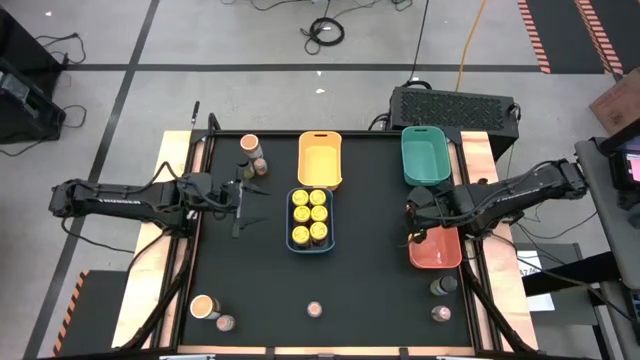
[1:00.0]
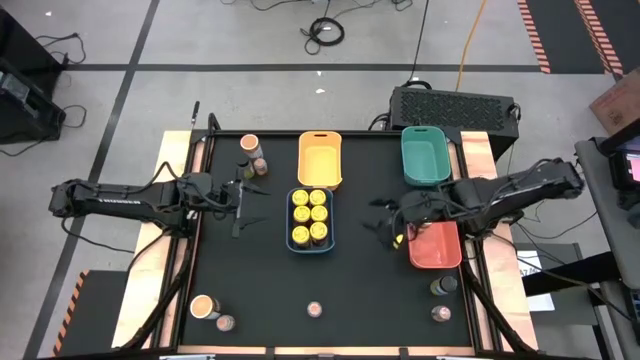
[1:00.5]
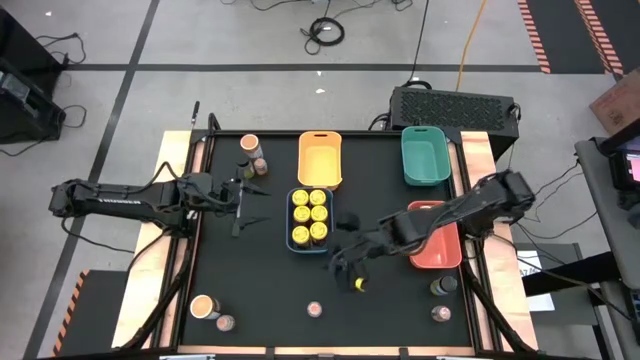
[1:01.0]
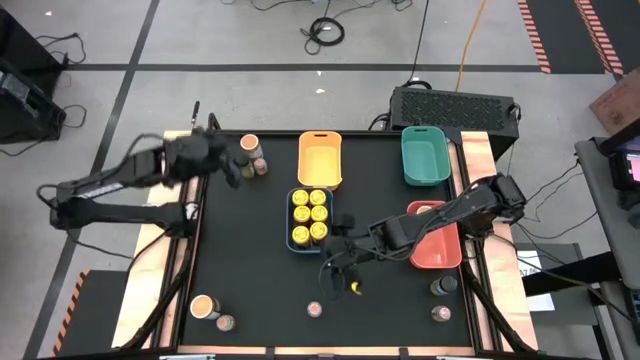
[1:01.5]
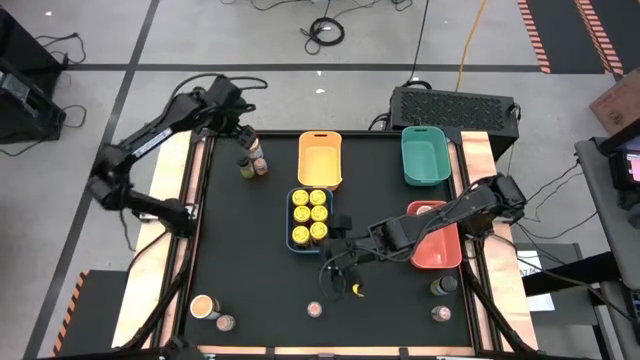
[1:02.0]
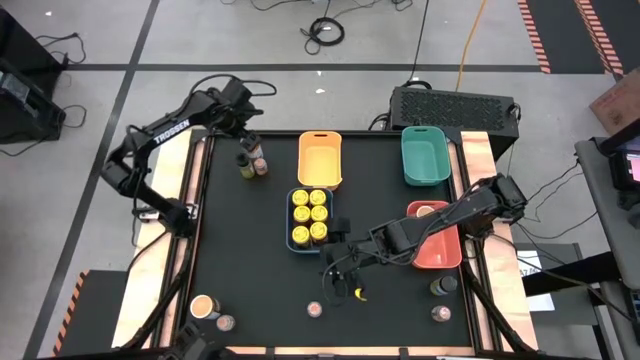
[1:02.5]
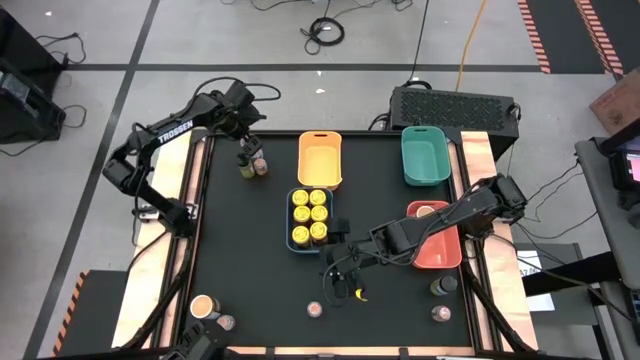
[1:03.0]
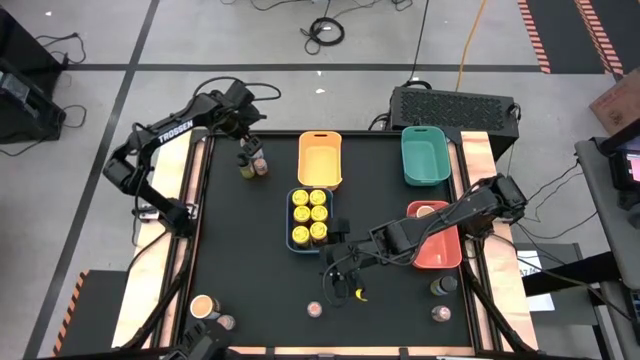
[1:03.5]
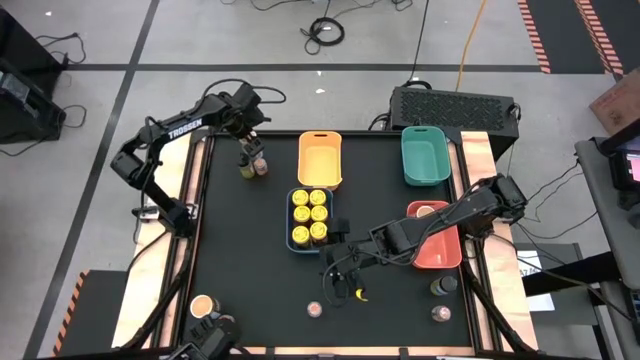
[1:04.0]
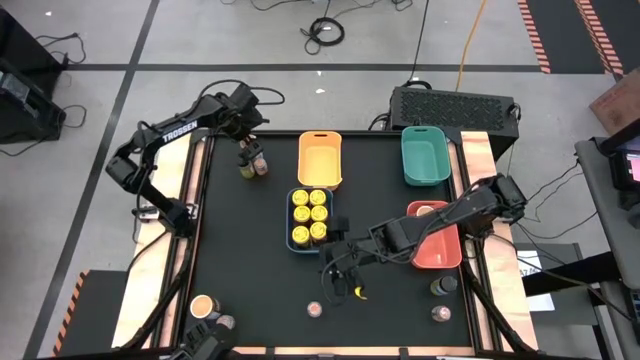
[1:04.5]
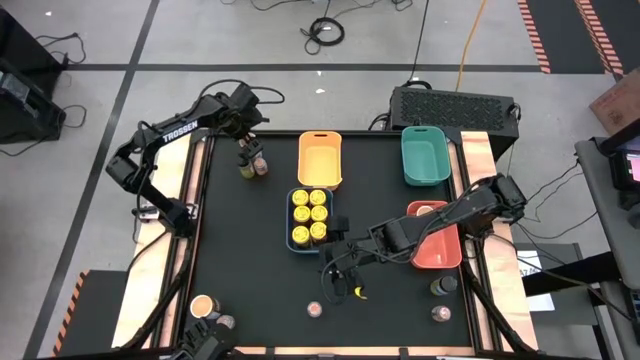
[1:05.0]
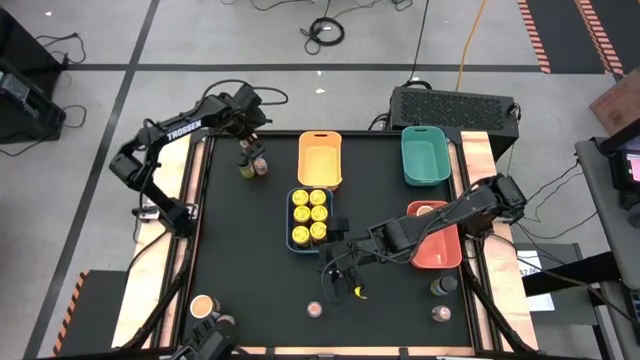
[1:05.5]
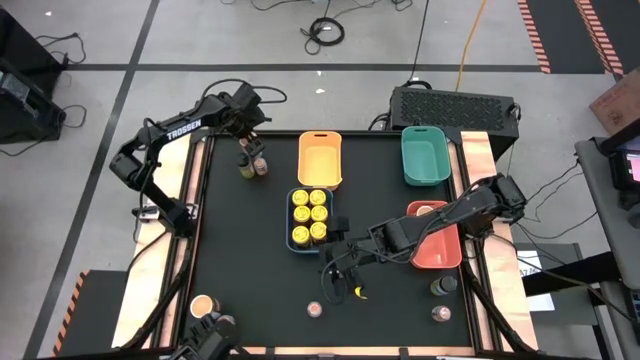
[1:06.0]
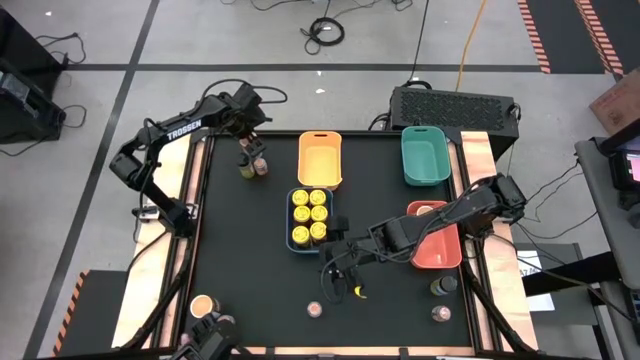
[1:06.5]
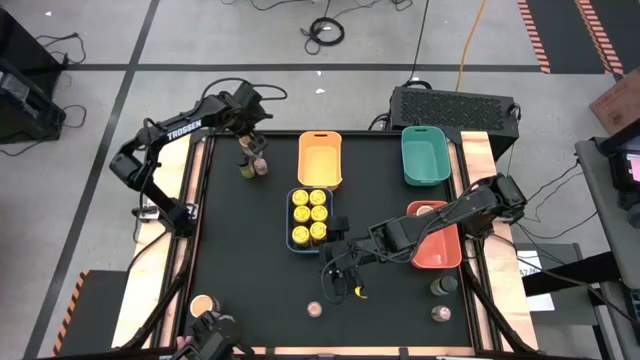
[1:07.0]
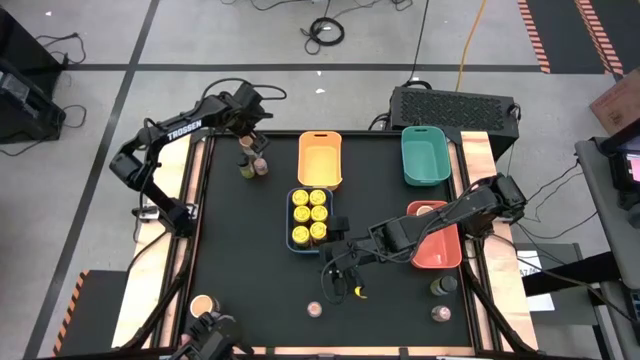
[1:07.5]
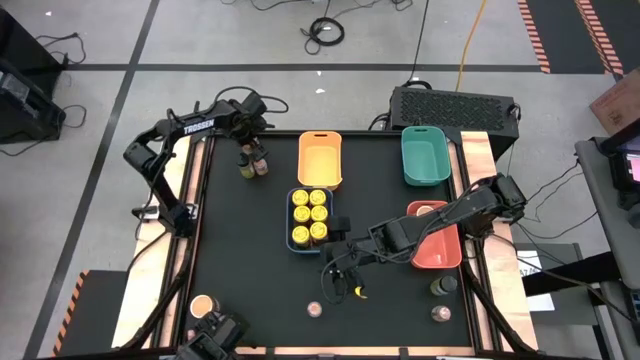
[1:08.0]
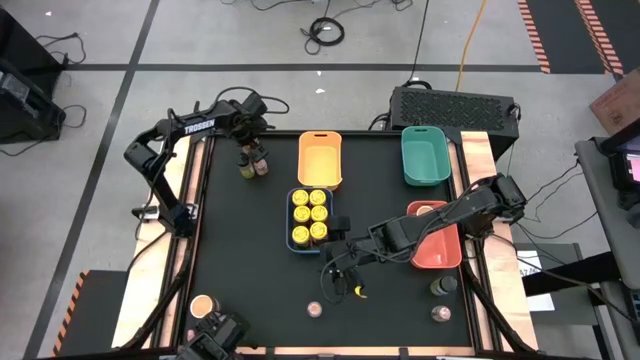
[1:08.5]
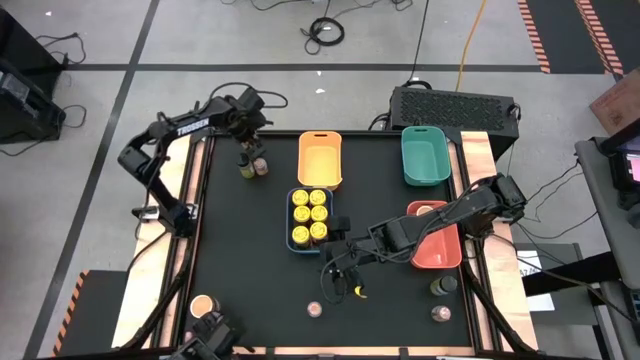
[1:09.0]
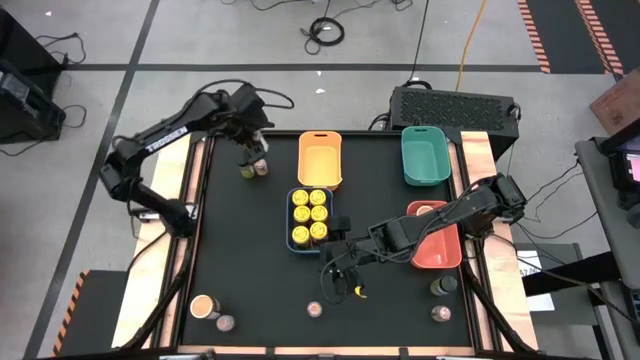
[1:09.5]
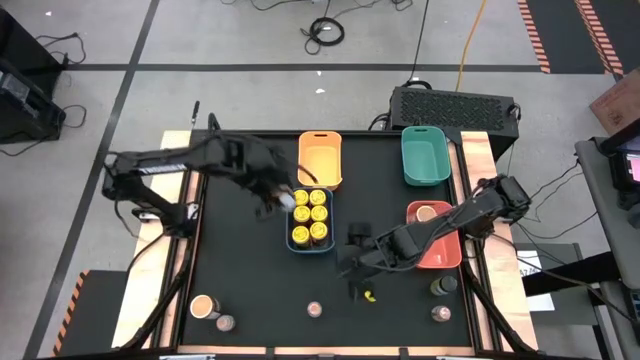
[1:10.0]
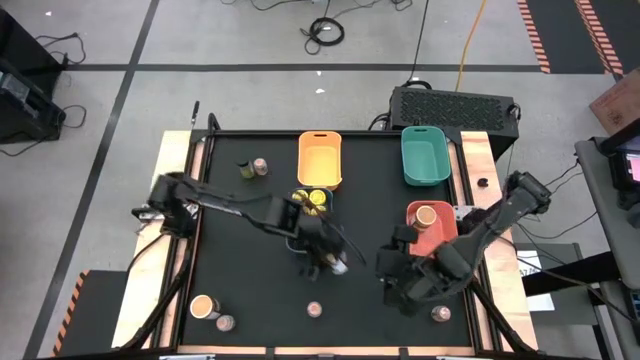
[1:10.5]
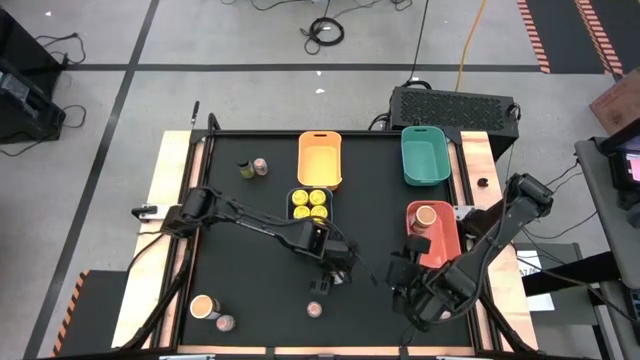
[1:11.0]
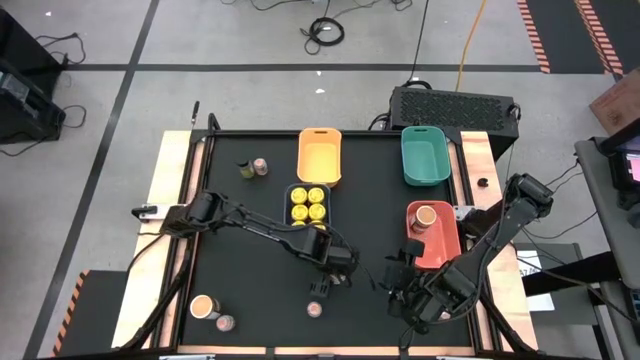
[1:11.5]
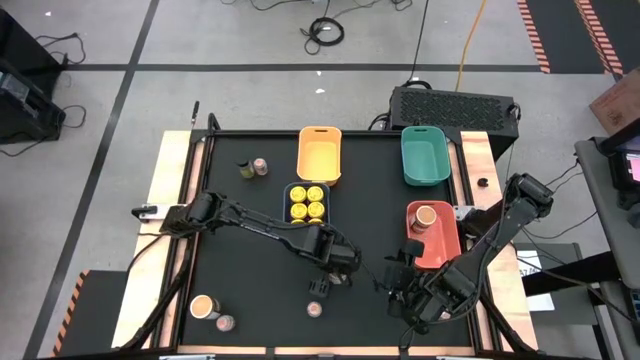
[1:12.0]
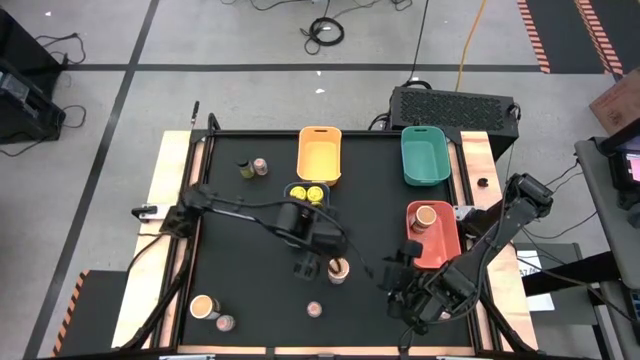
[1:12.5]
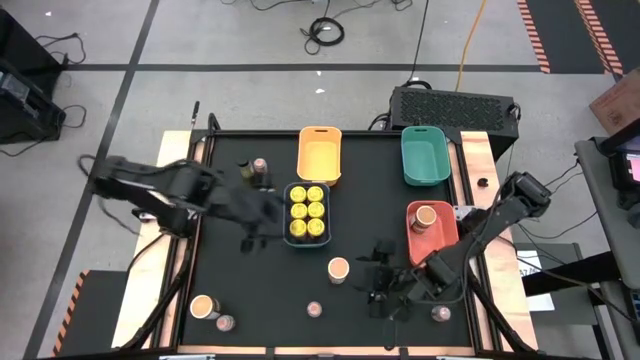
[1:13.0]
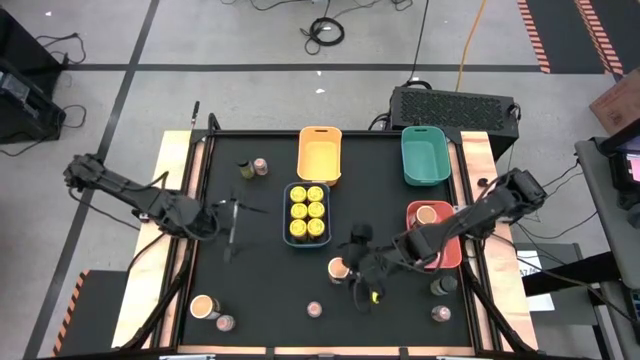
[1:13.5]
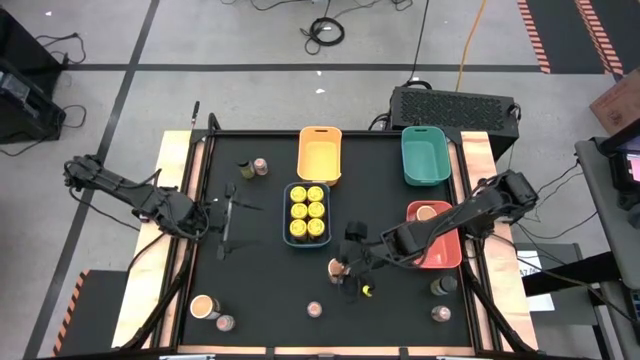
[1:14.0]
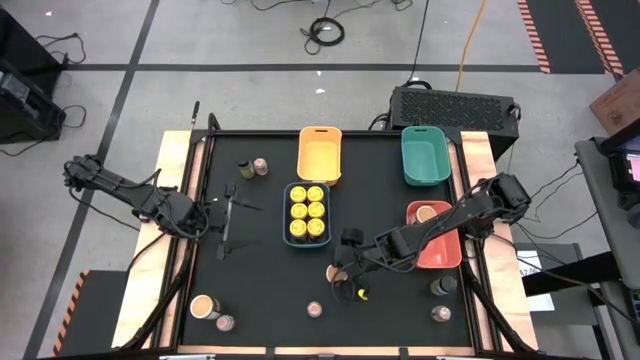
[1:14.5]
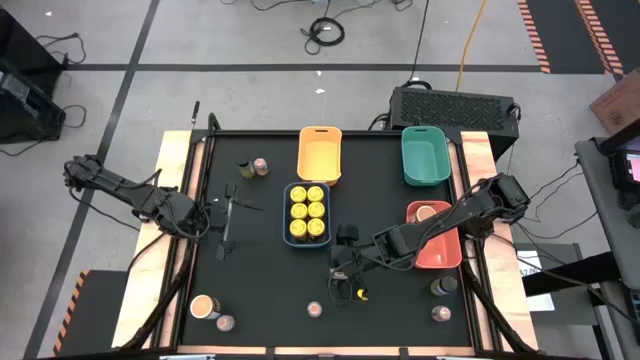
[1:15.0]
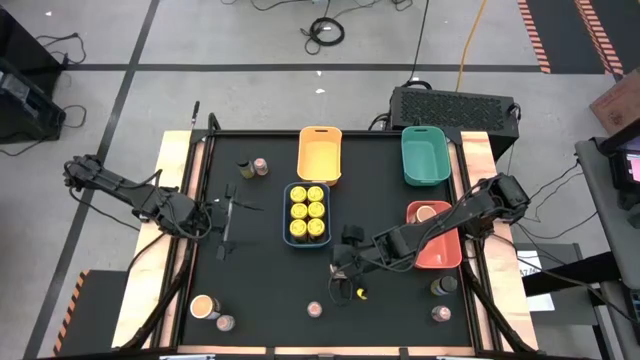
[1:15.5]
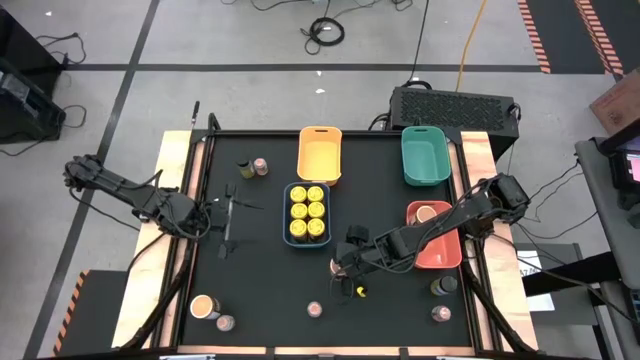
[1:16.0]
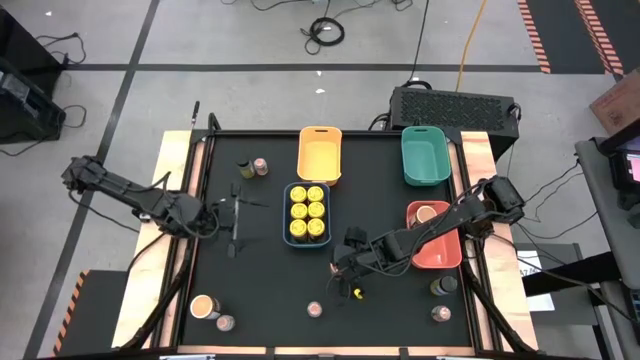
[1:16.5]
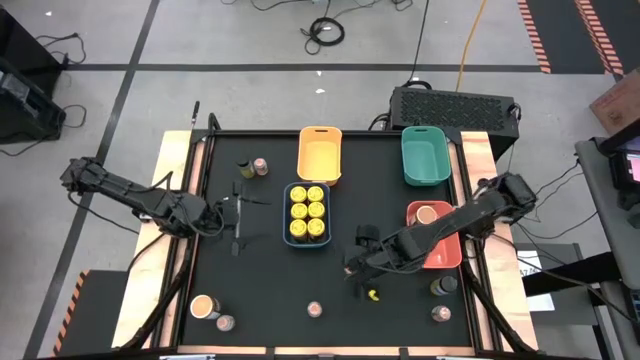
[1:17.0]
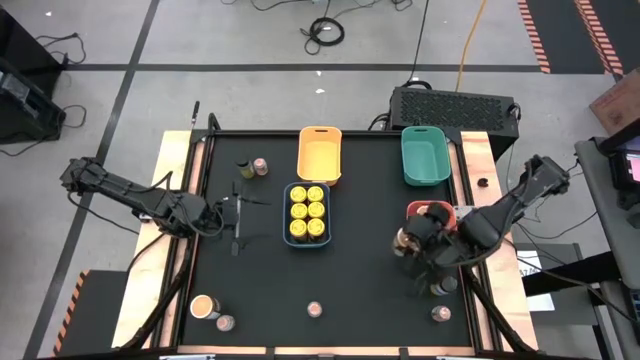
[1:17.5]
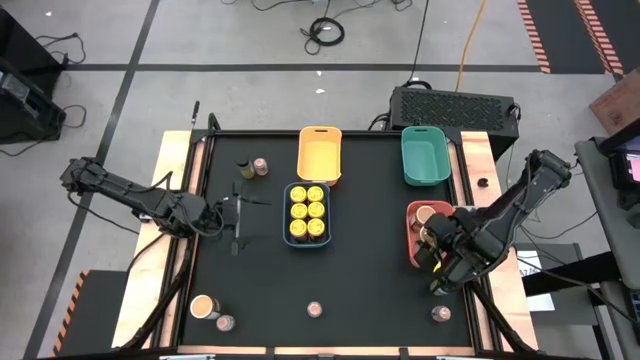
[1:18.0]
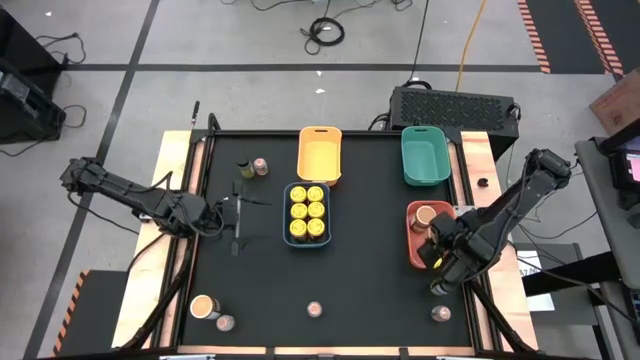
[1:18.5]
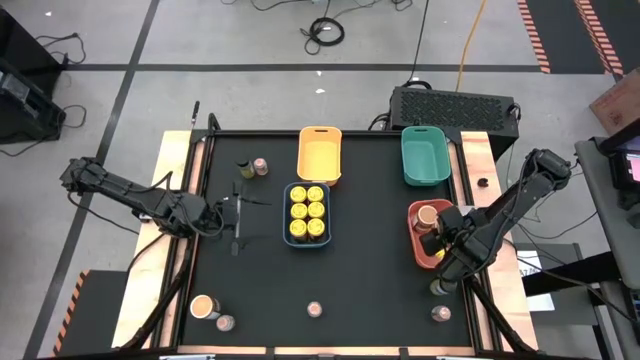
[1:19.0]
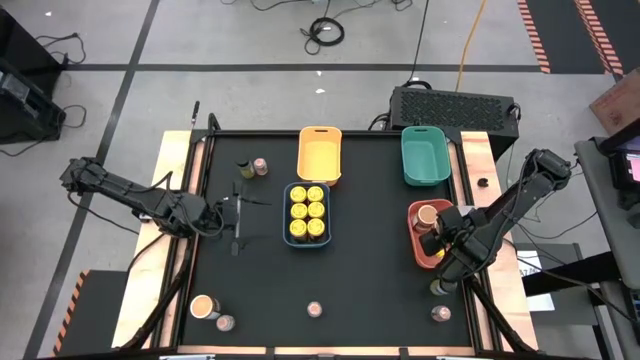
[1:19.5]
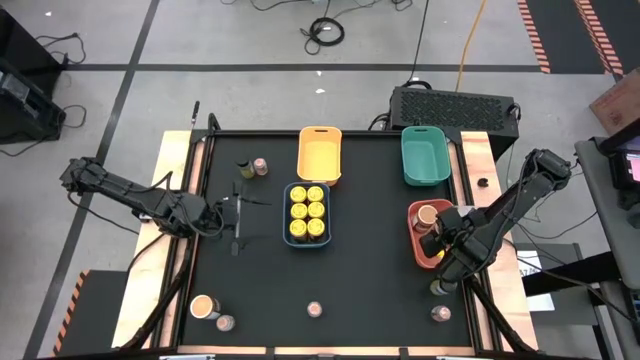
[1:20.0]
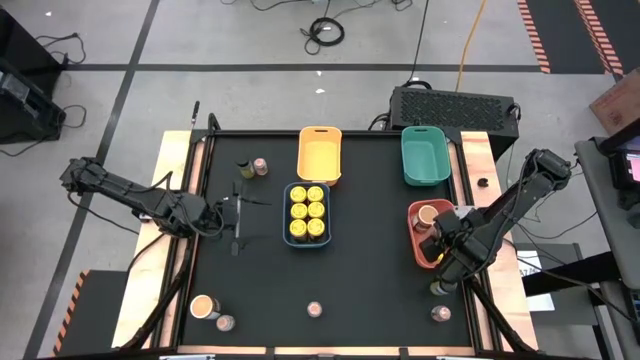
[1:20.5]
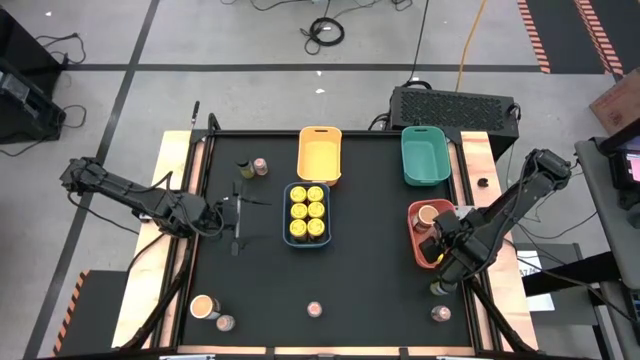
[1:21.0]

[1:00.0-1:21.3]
Task: Sort spices by type
Put the gold seasoning bottle into the orange bin
